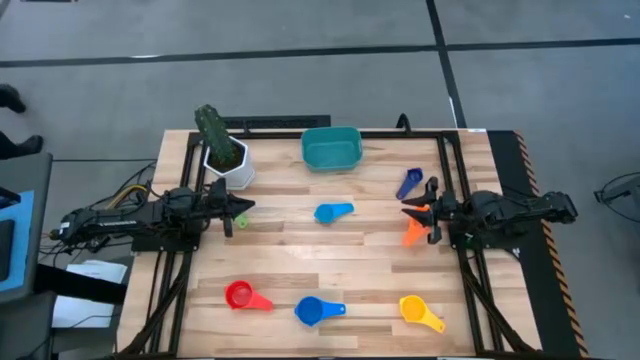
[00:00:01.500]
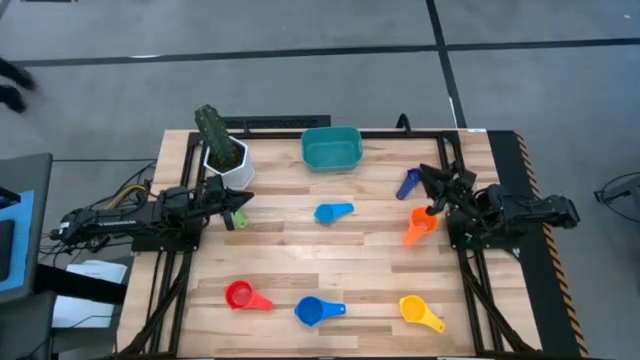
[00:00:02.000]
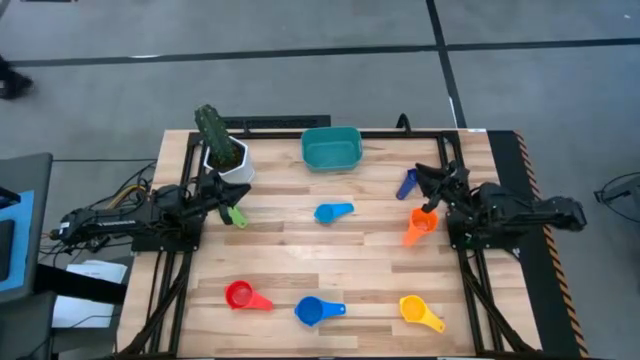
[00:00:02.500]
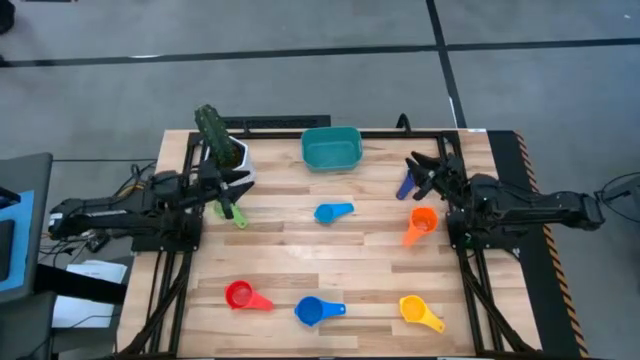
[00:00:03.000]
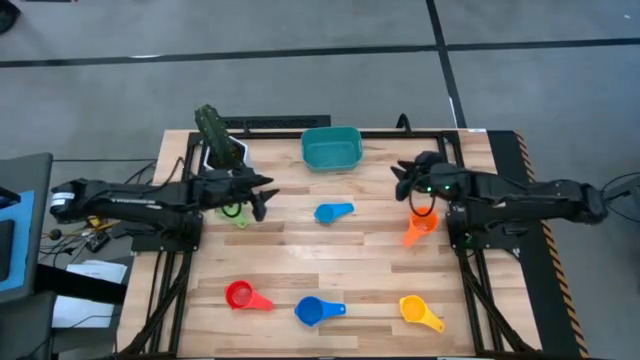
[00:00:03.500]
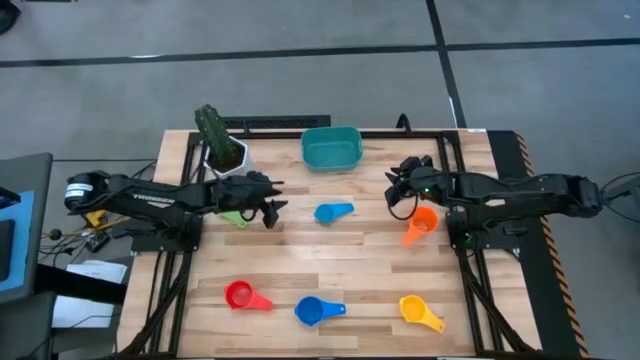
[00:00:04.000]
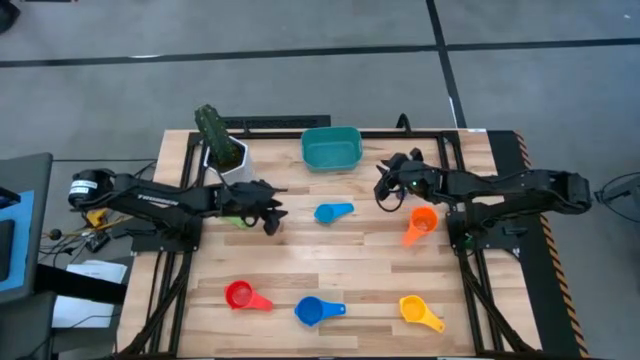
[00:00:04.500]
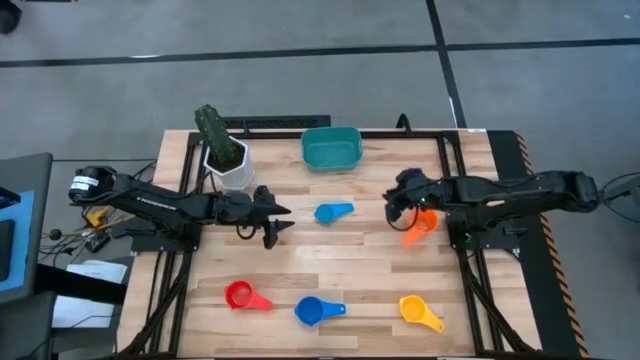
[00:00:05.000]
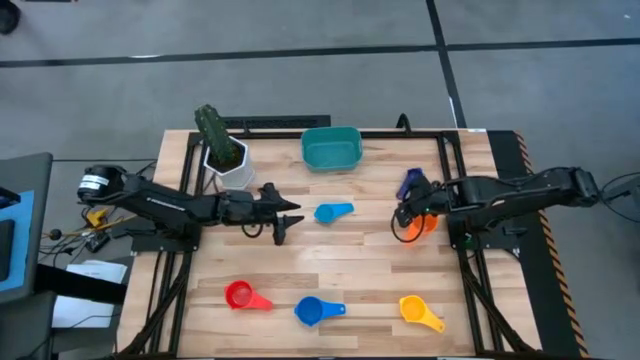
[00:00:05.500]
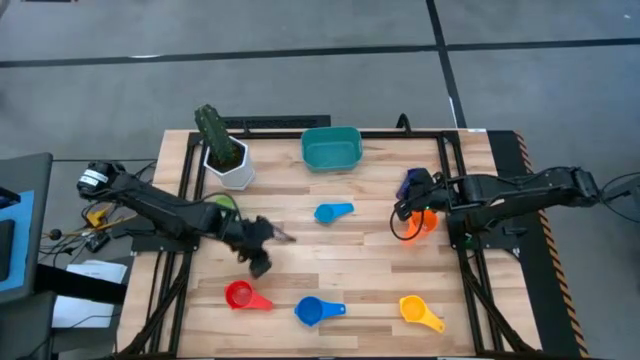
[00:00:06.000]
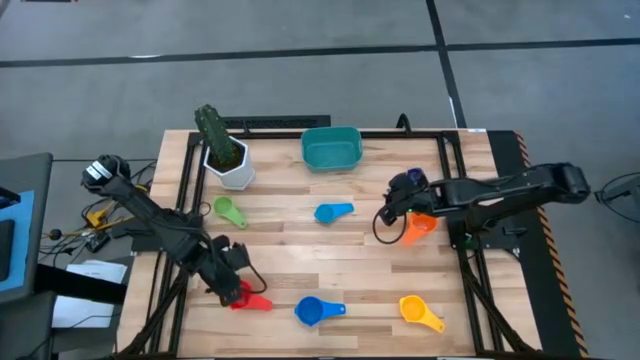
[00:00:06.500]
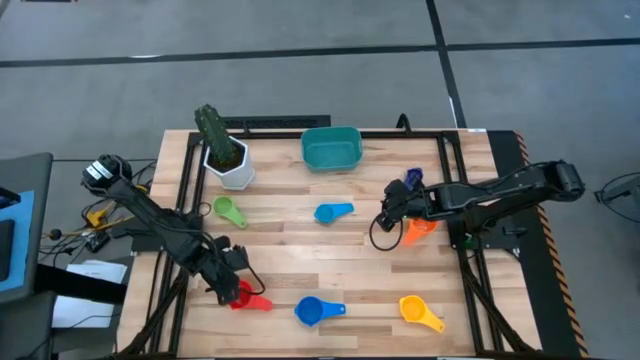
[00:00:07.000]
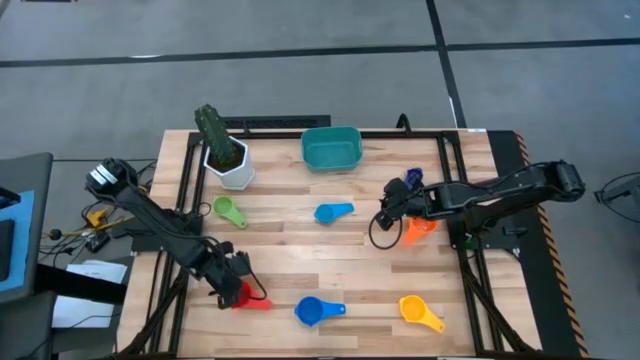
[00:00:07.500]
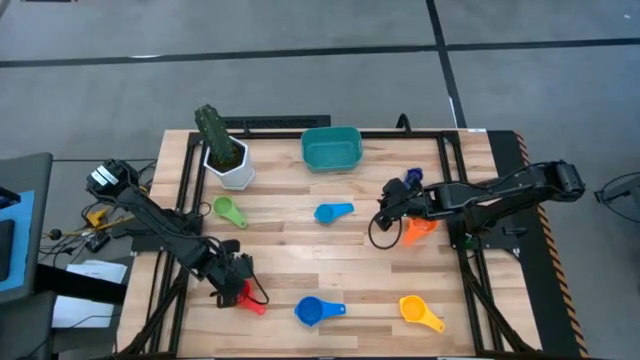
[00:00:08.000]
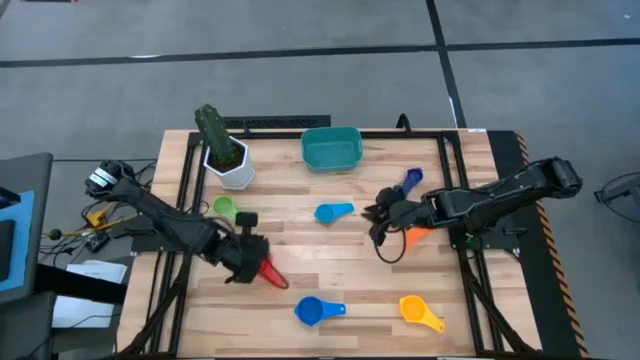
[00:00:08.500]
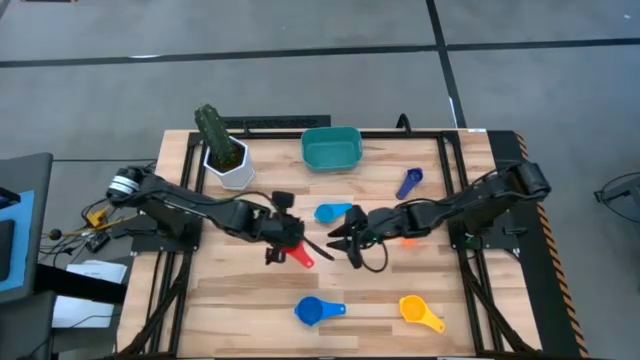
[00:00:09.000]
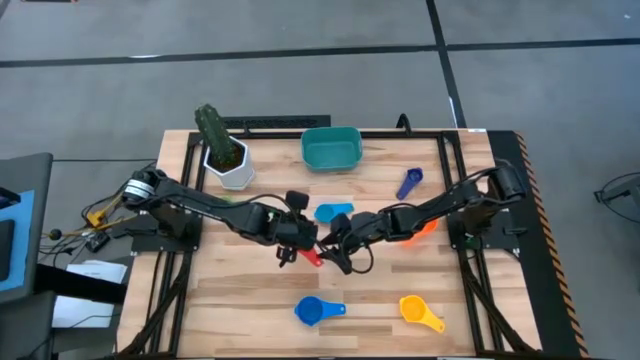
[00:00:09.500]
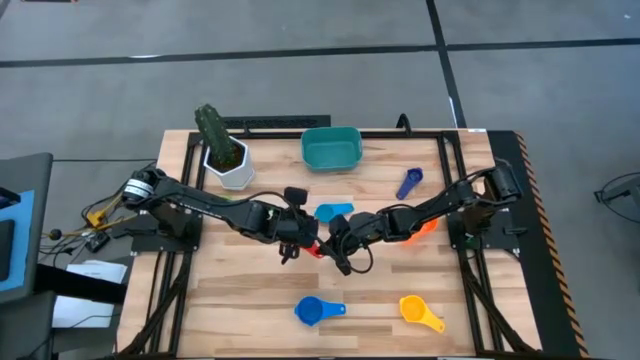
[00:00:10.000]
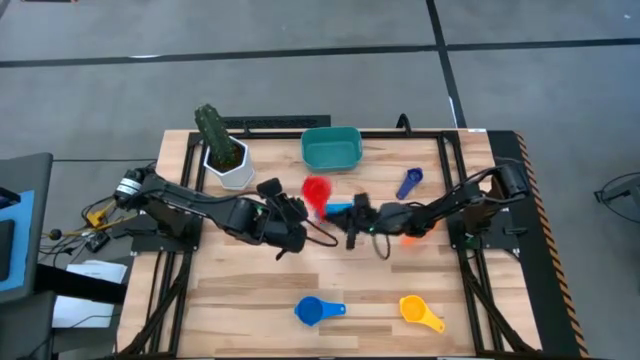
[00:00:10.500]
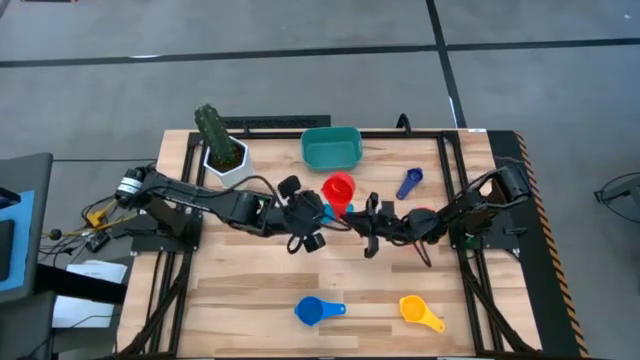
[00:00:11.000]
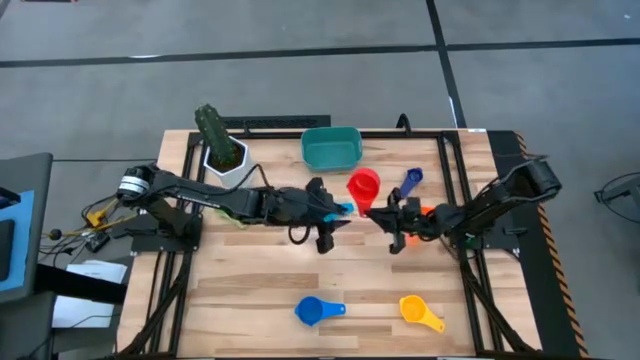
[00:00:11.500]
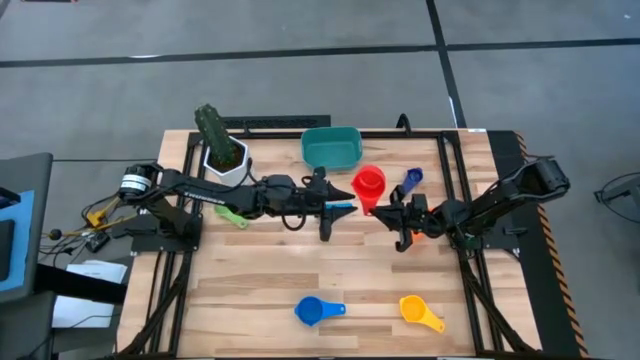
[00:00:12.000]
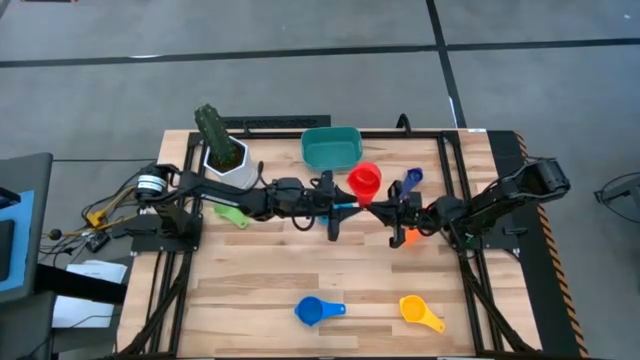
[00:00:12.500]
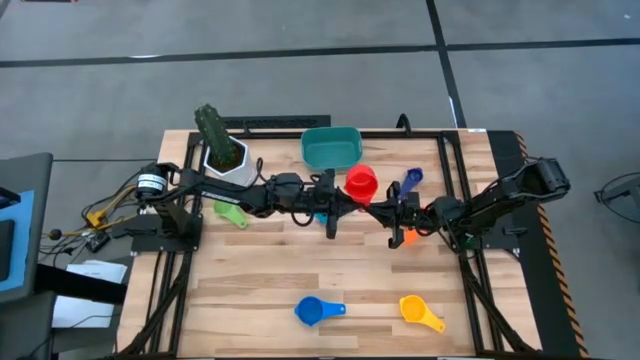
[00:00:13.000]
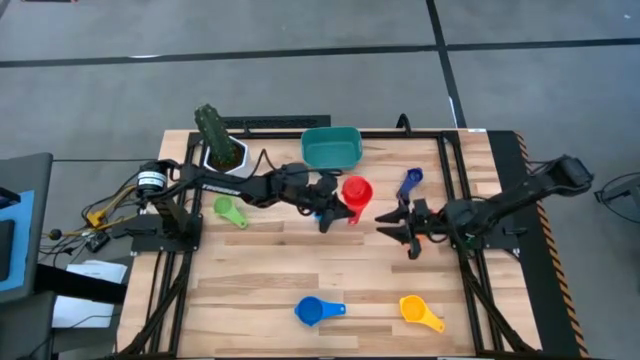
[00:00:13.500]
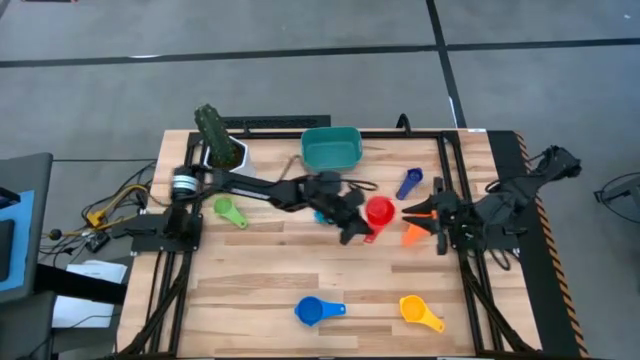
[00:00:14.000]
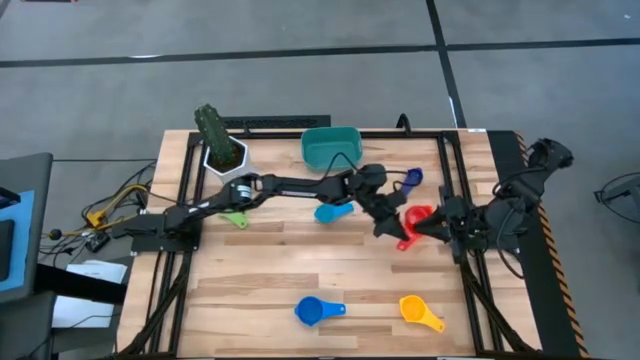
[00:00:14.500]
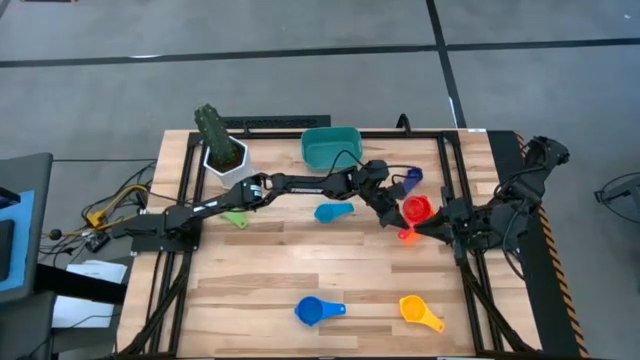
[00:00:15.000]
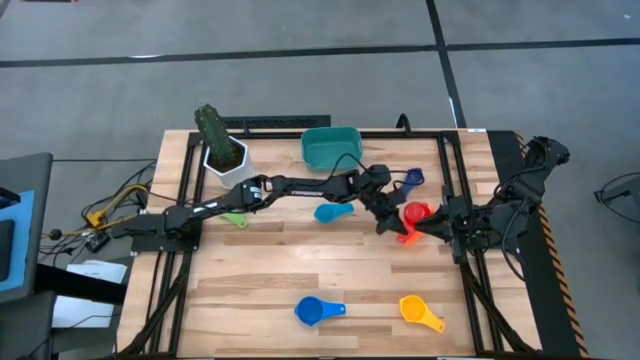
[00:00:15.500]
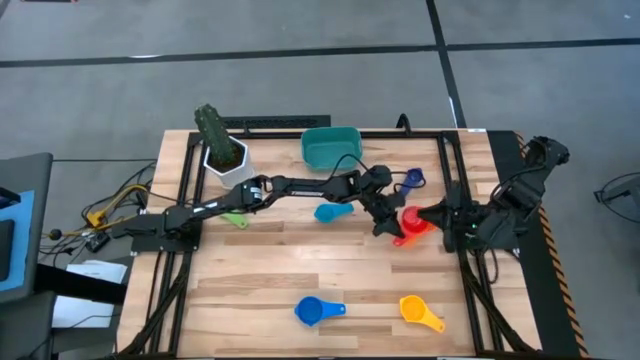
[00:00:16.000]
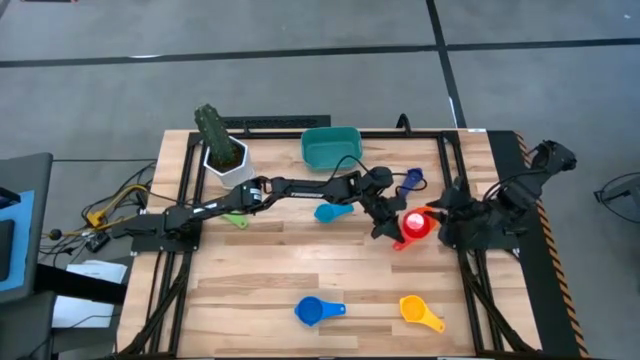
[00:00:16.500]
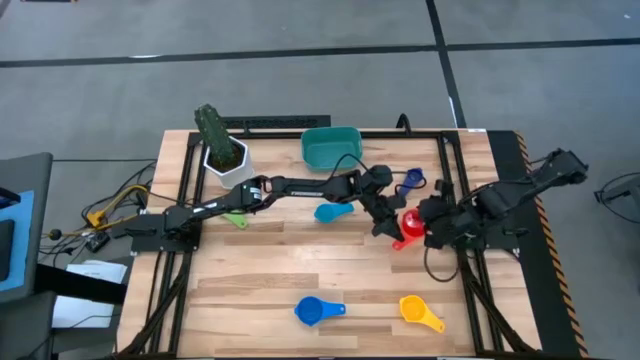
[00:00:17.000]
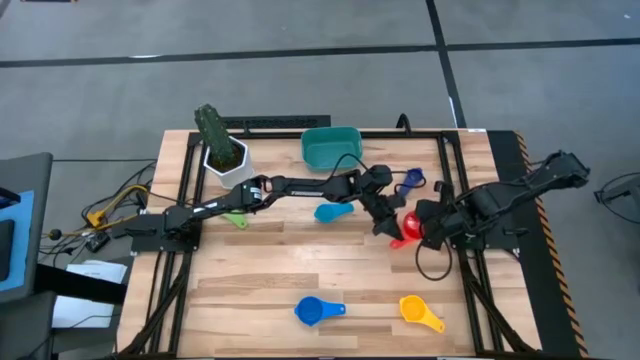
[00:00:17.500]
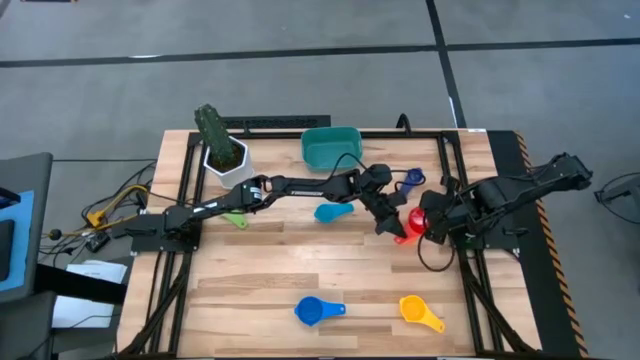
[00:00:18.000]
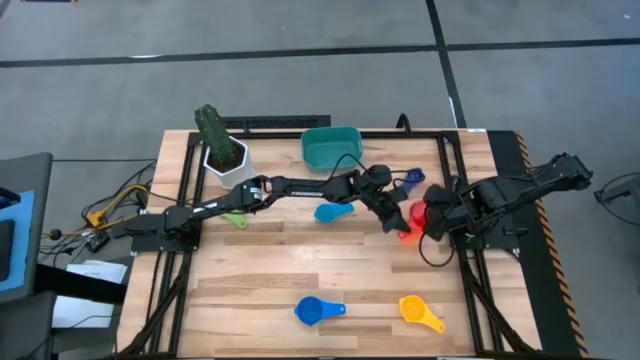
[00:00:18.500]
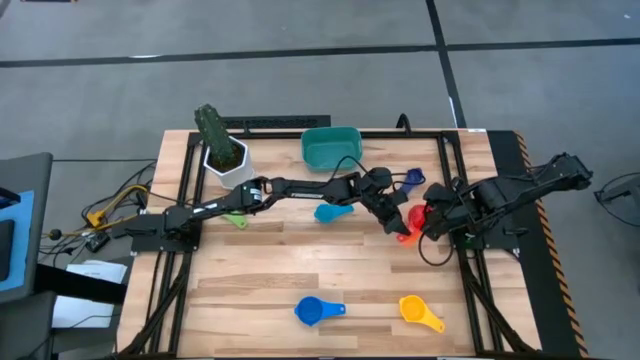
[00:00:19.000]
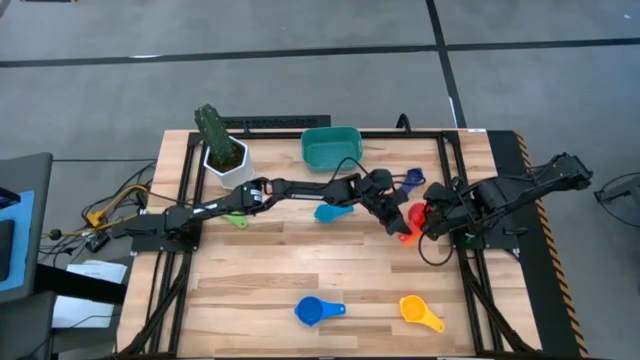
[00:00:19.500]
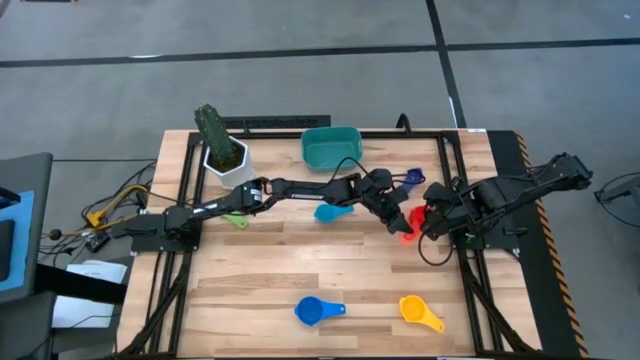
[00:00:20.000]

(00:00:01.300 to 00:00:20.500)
Task: Nest measuring cups in basket
Stack the red measuring cup into the orange measuring cup
